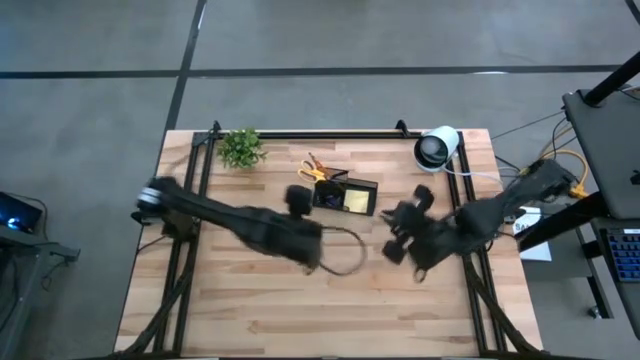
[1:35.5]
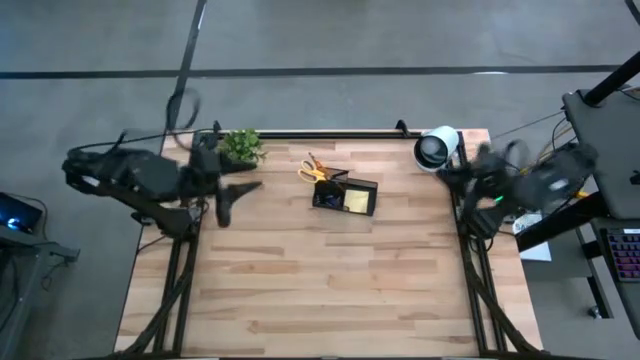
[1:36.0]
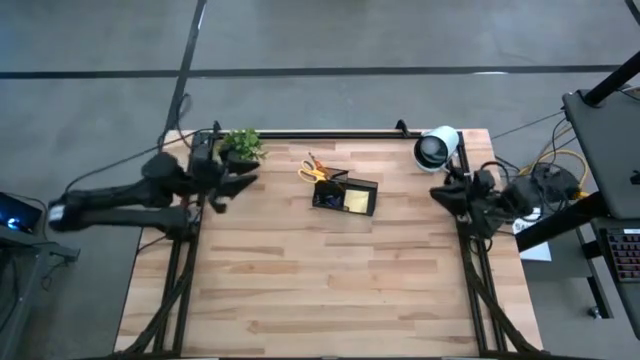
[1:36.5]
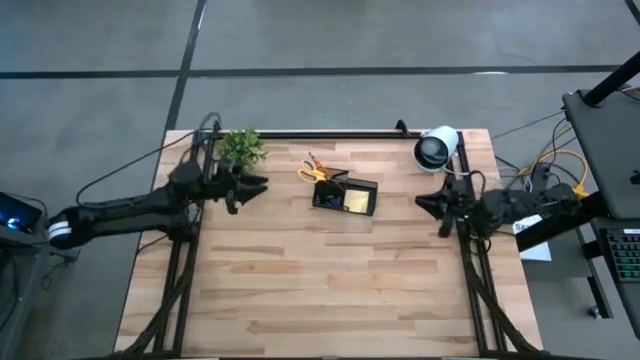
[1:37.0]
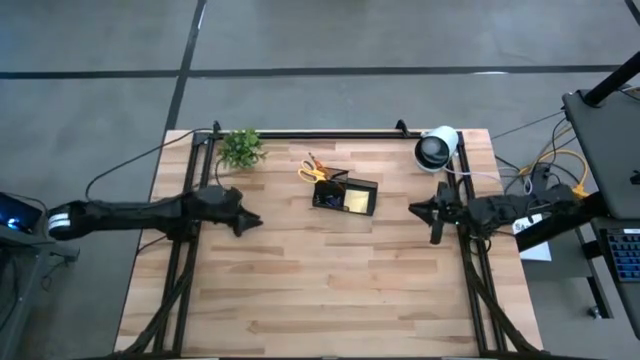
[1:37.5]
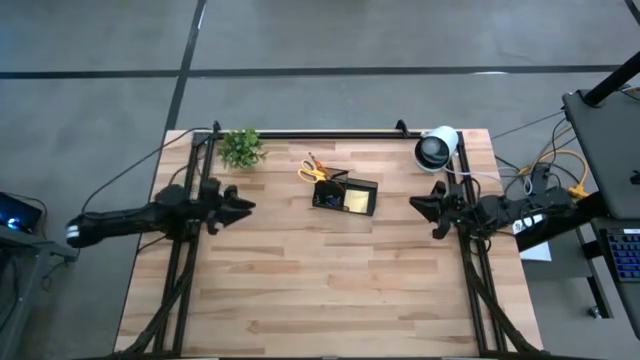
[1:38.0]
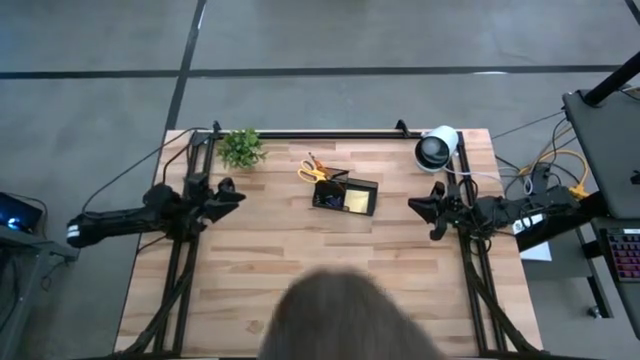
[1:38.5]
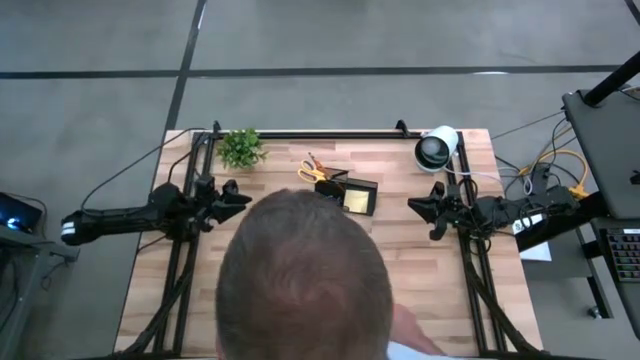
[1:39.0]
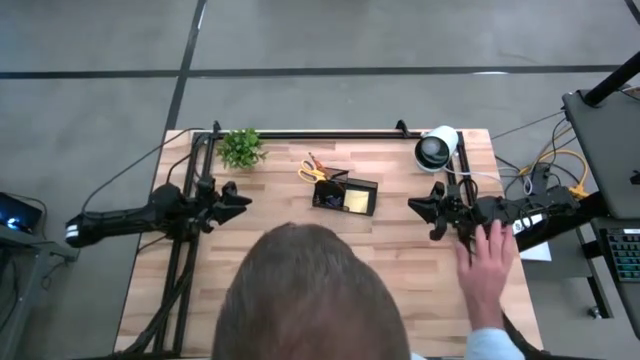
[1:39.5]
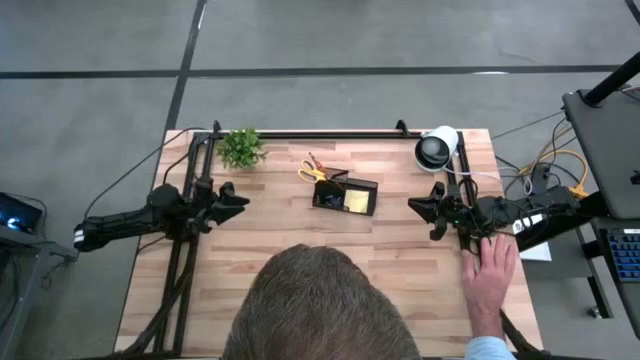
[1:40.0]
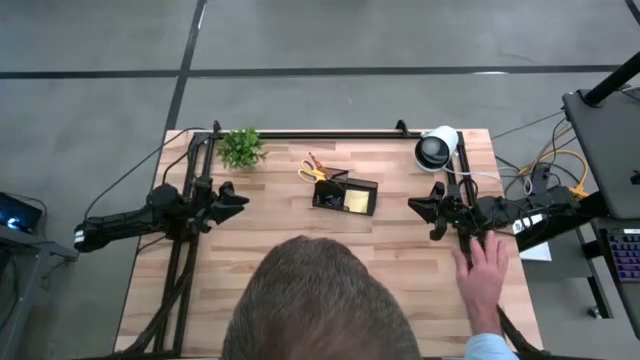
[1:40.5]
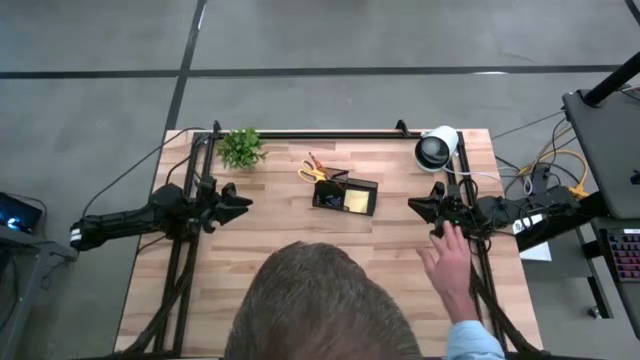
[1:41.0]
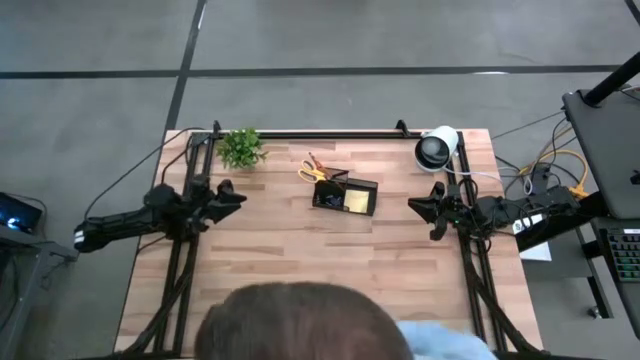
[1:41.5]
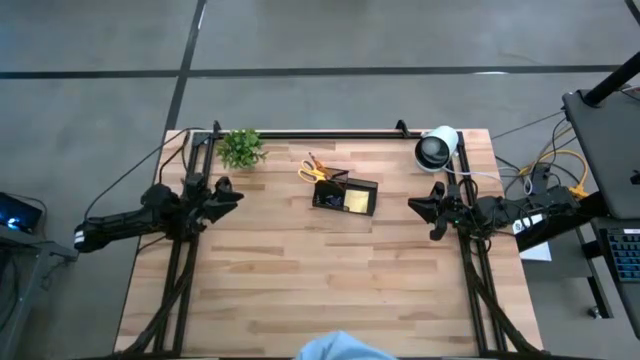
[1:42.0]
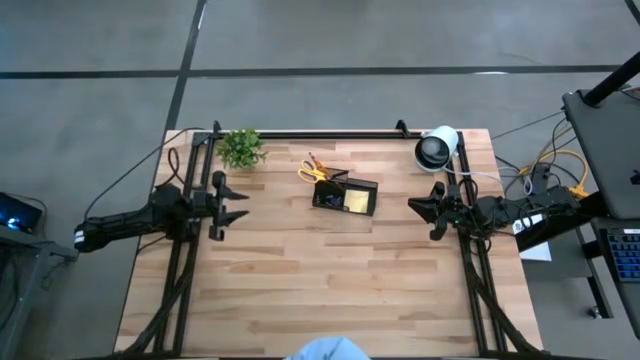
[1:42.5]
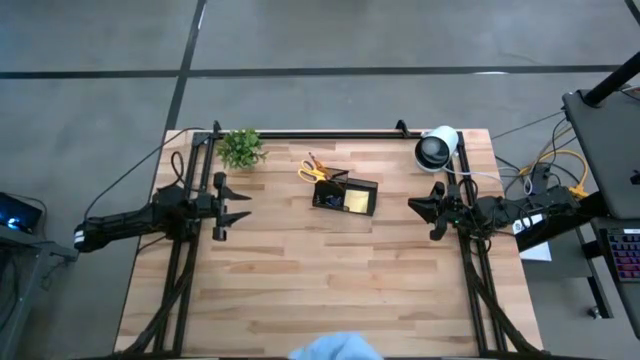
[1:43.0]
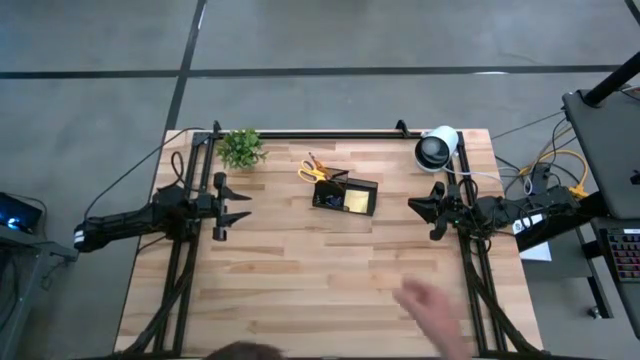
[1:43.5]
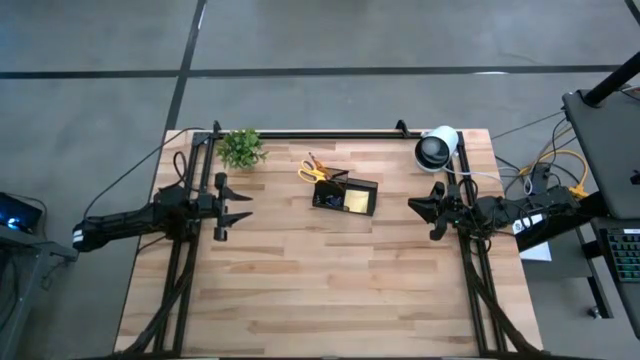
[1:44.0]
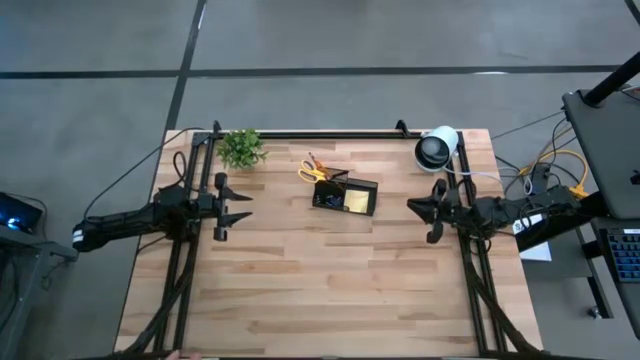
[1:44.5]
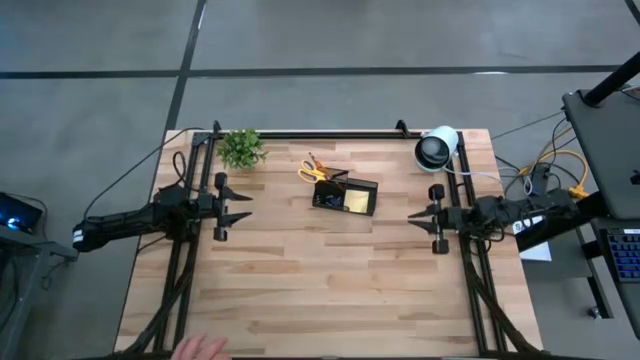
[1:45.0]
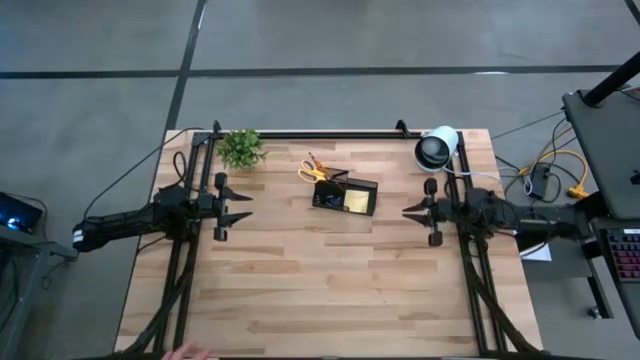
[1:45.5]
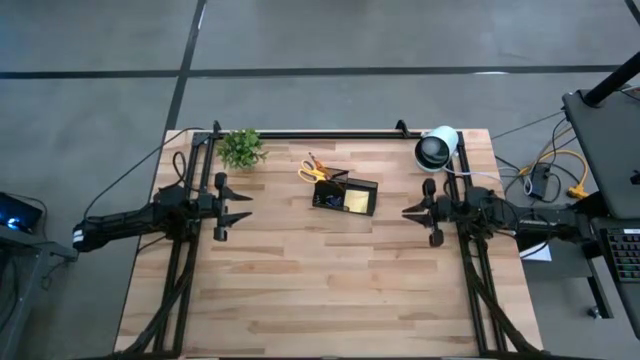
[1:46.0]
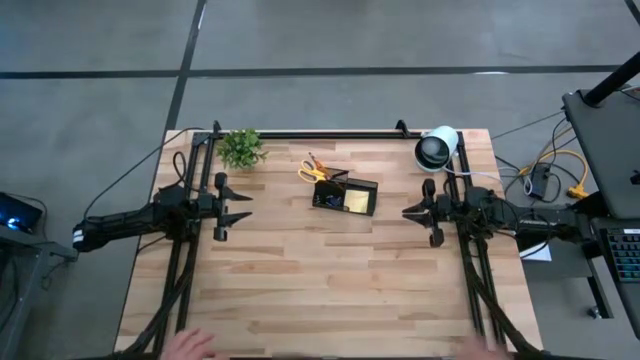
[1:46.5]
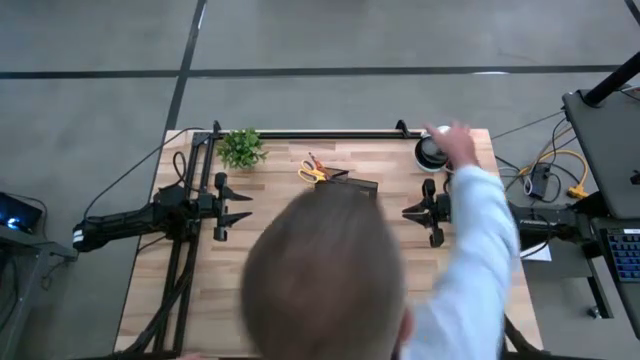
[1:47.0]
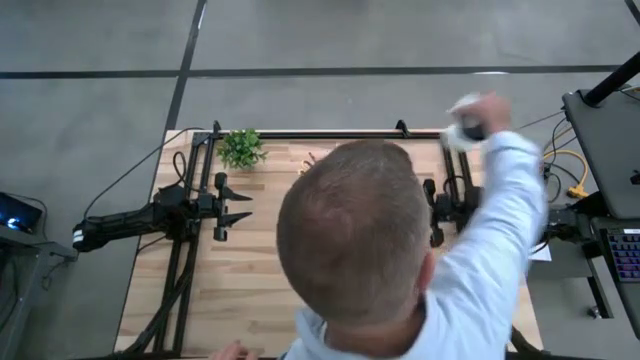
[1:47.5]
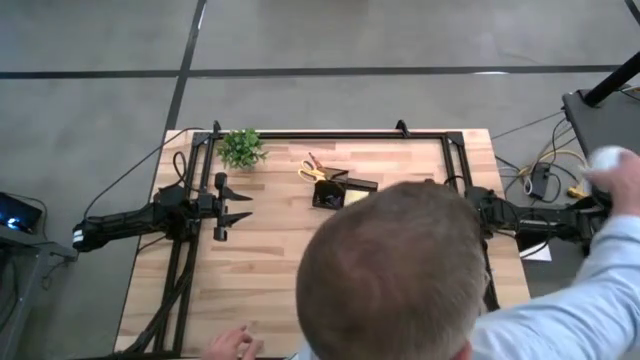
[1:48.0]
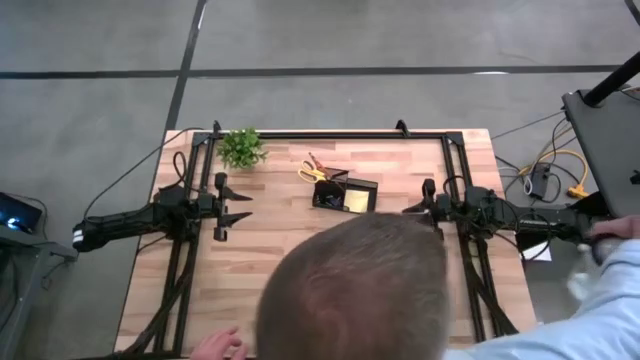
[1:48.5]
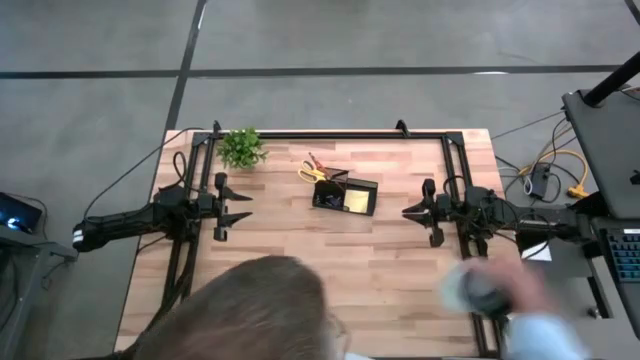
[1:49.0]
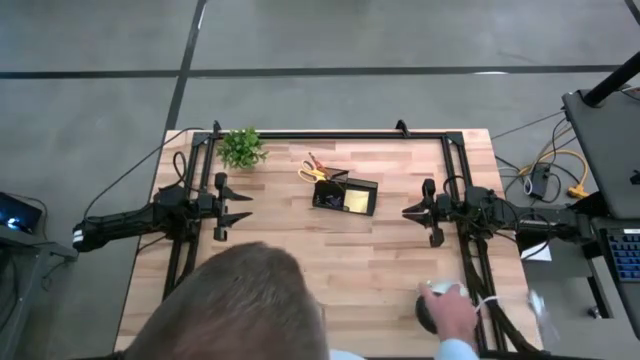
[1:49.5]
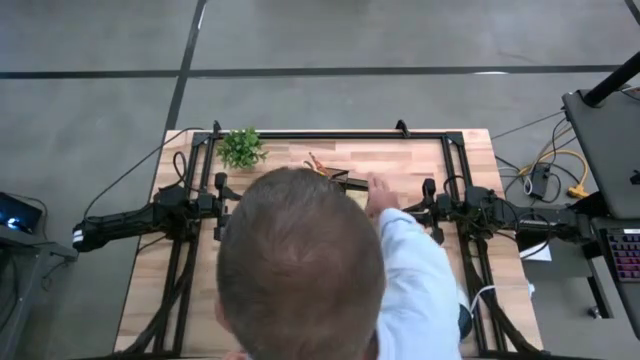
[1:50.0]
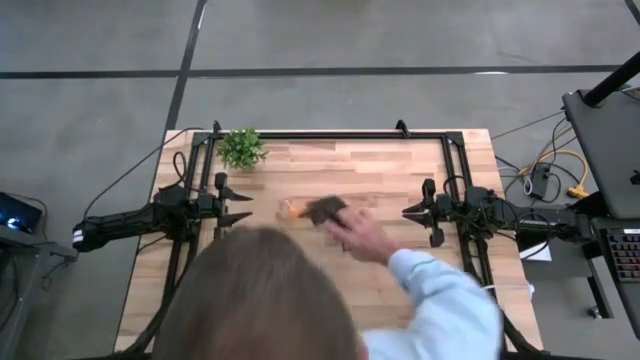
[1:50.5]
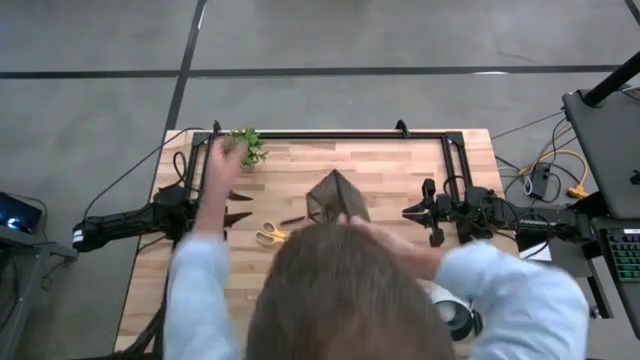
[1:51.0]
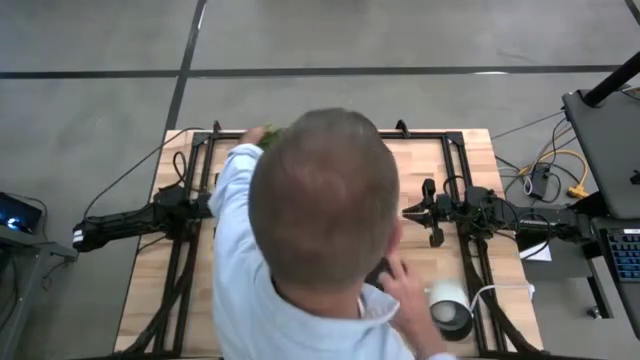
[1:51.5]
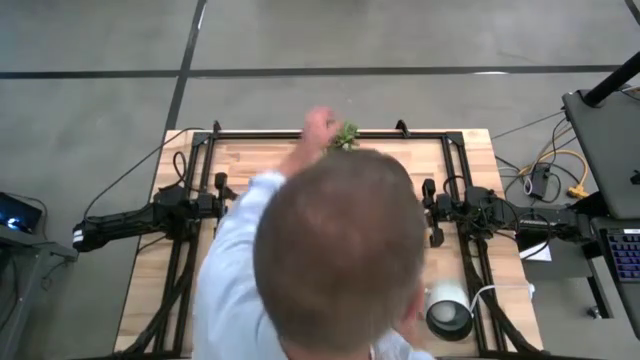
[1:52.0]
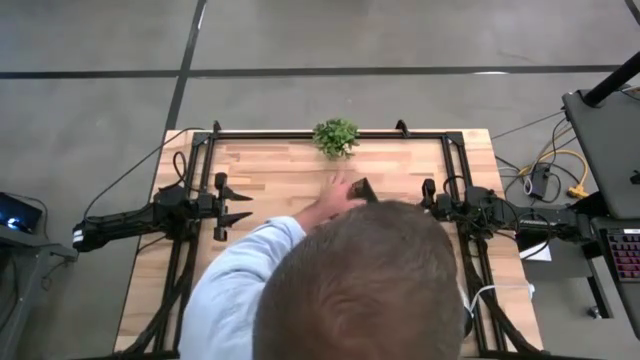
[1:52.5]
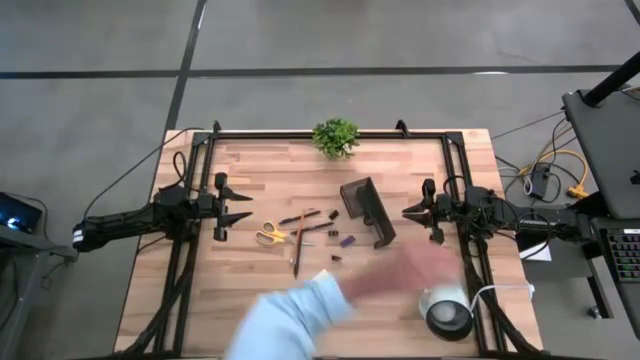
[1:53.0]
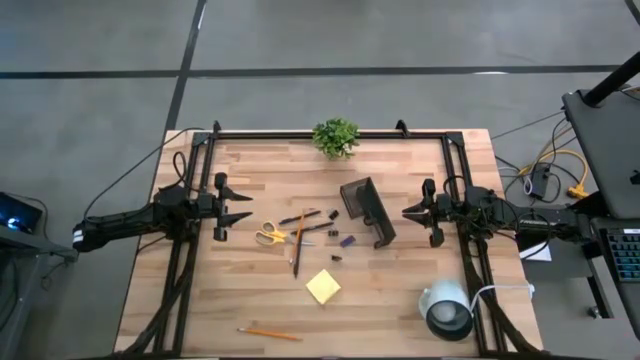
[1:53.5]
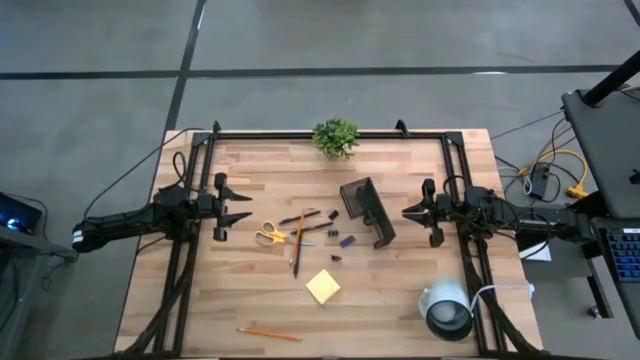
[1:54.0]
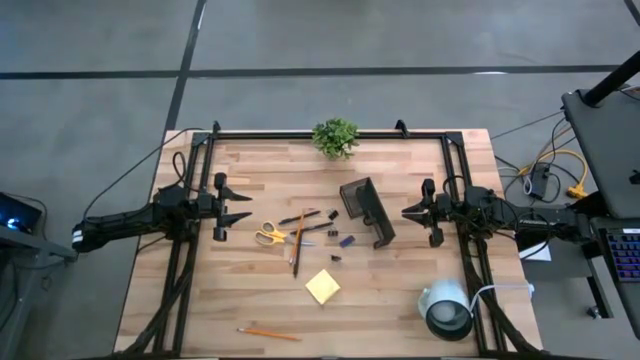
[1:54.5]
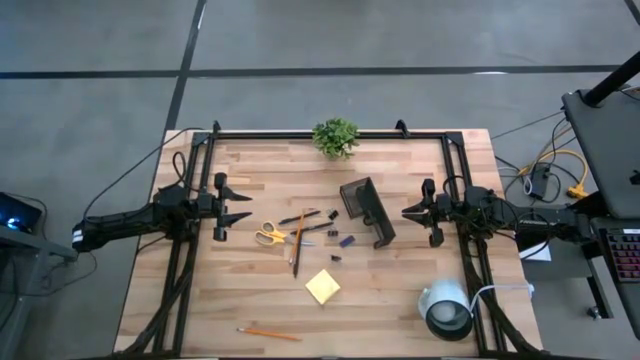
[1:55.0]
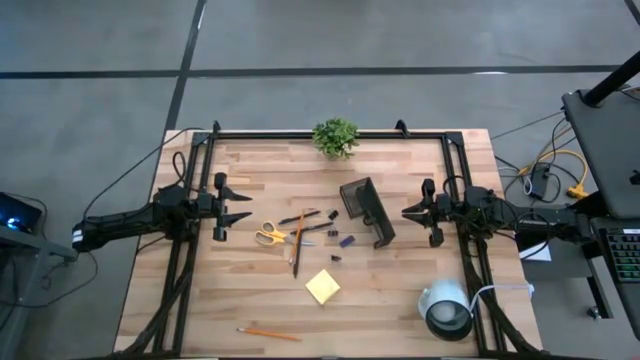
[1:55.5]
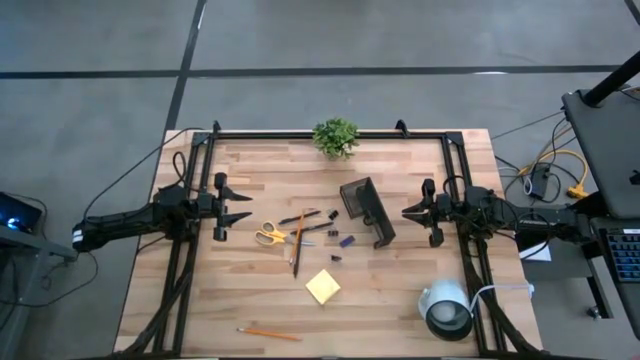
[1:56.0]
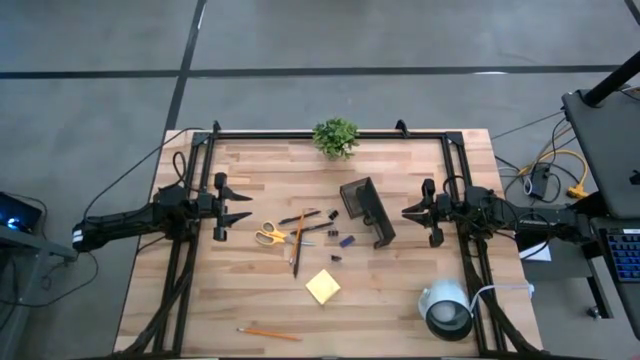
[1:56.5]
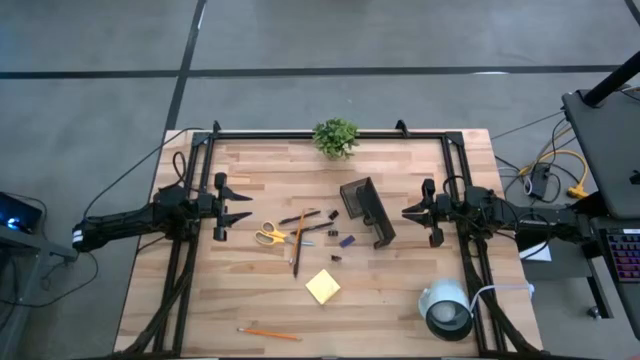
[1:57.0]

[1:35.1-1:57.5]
Task: Pick and place office supplies into organizer
Return to Home Position

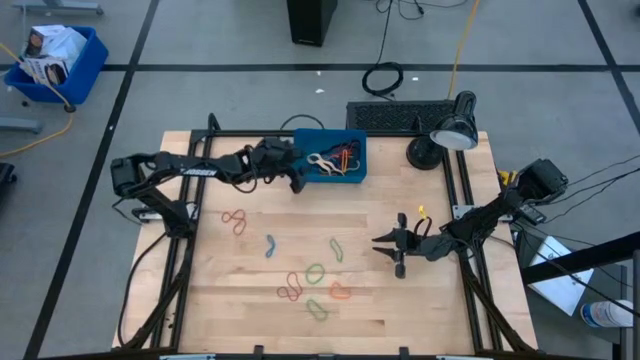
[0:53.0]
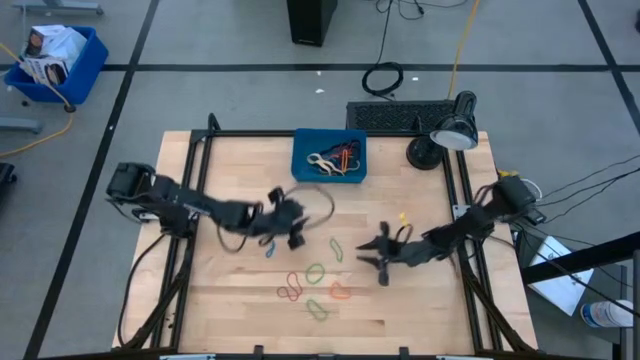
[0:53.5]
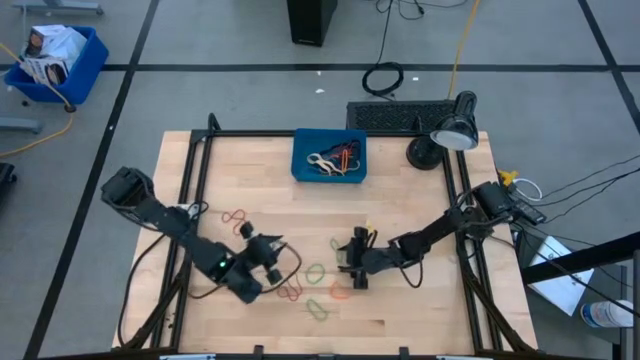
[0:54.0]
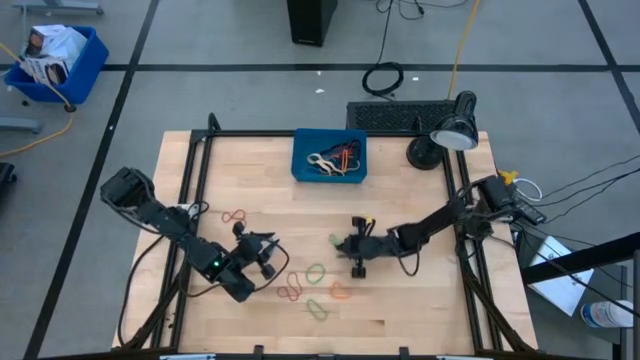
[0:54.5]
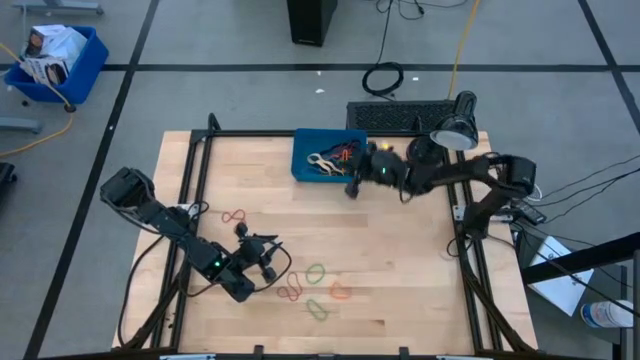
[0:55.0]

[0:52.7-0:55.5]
Task: Pick and place rubber bands into bin
Put the green rubber band into the blue bin
